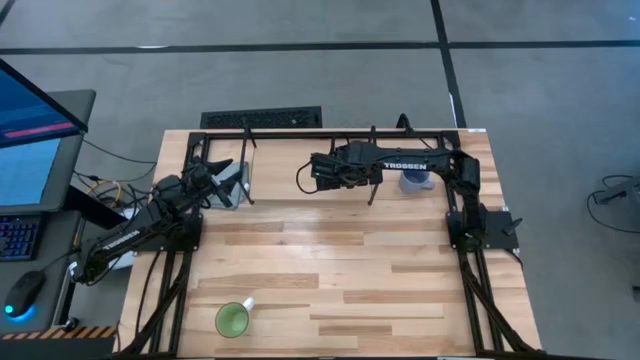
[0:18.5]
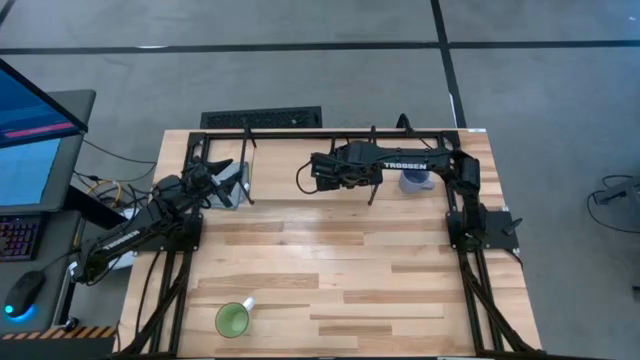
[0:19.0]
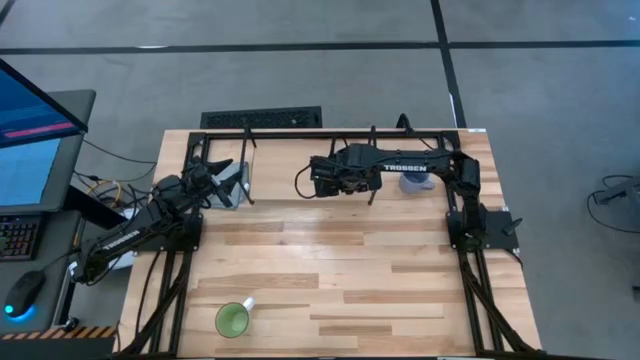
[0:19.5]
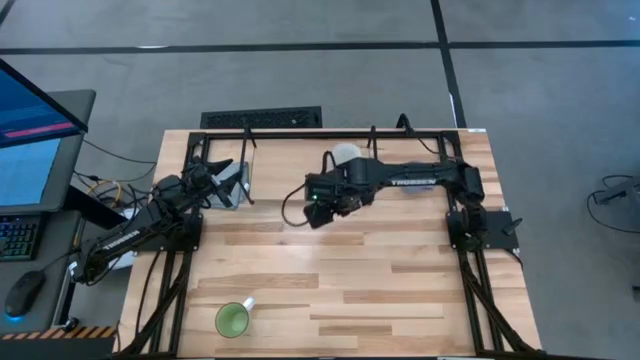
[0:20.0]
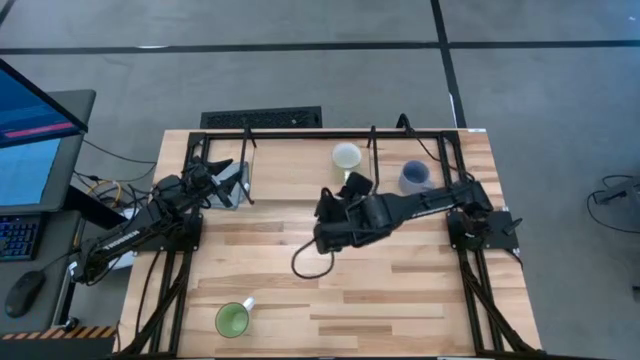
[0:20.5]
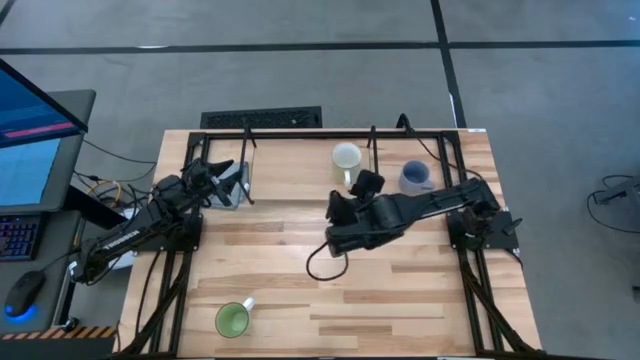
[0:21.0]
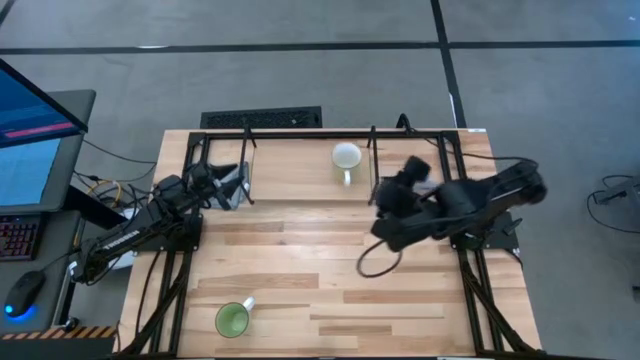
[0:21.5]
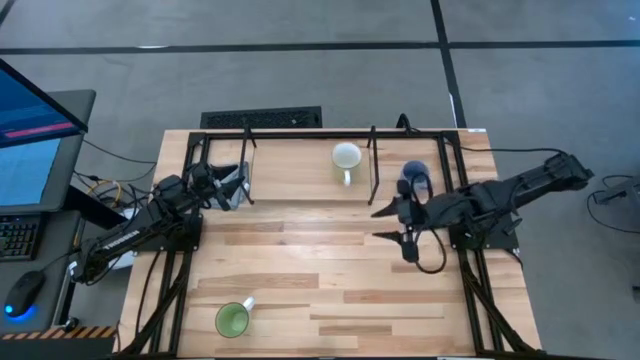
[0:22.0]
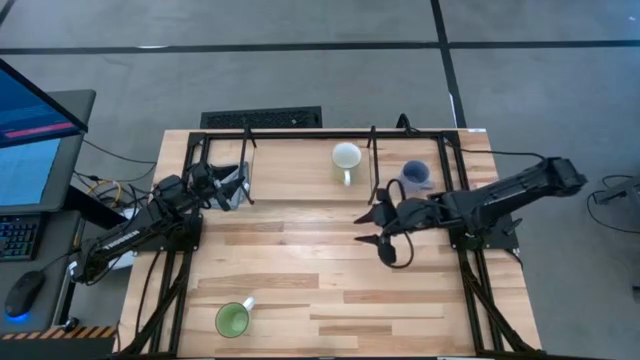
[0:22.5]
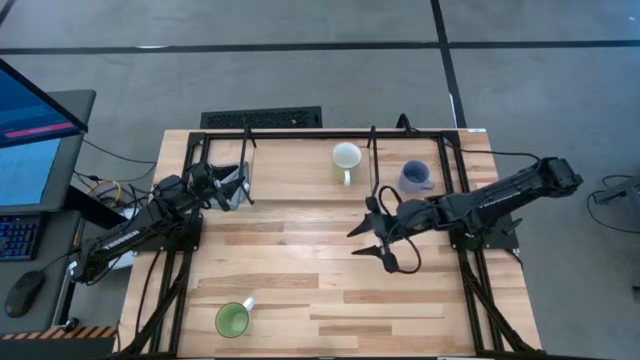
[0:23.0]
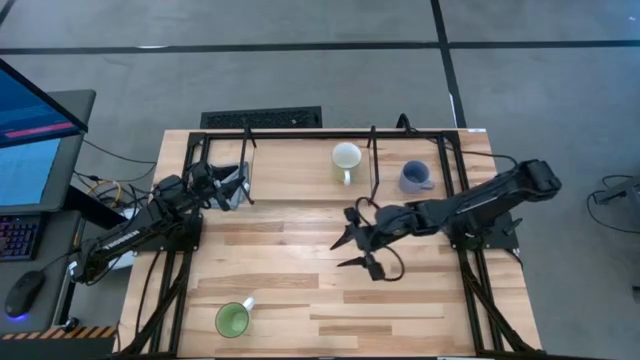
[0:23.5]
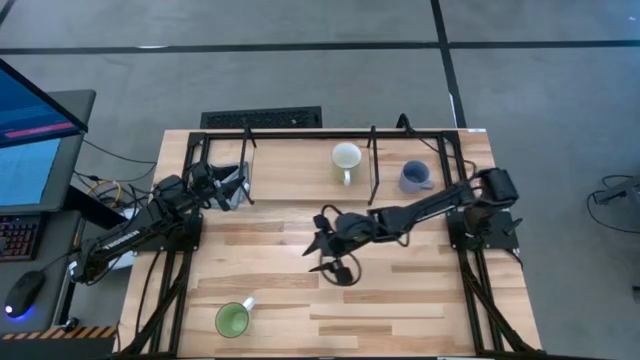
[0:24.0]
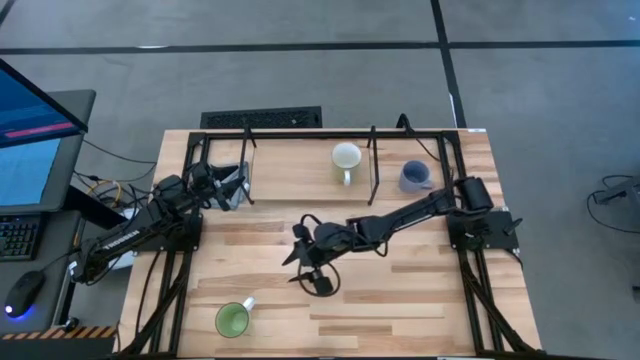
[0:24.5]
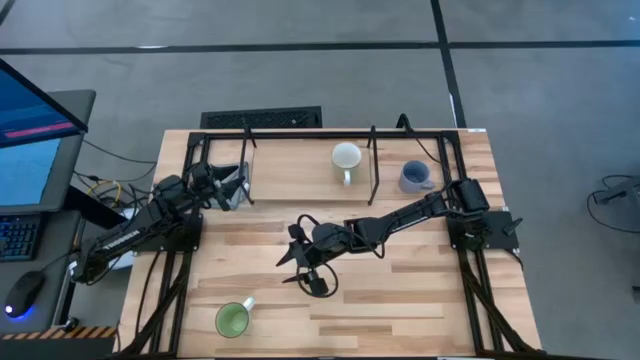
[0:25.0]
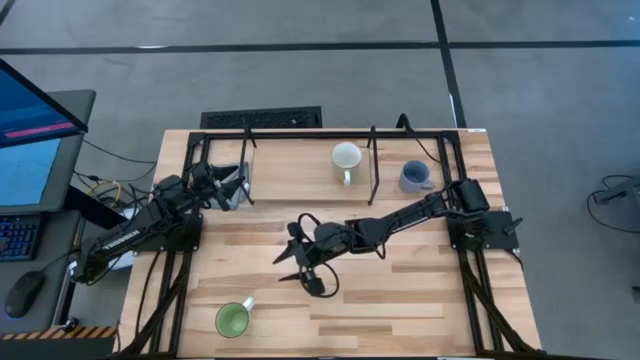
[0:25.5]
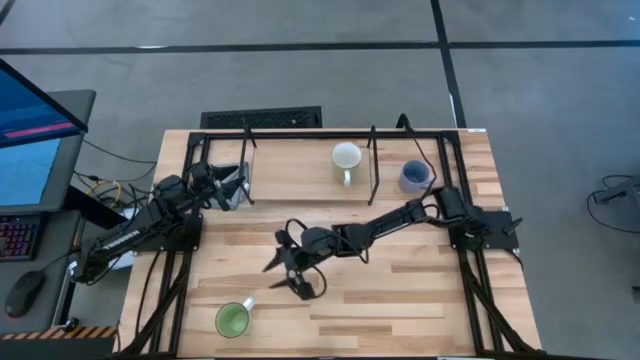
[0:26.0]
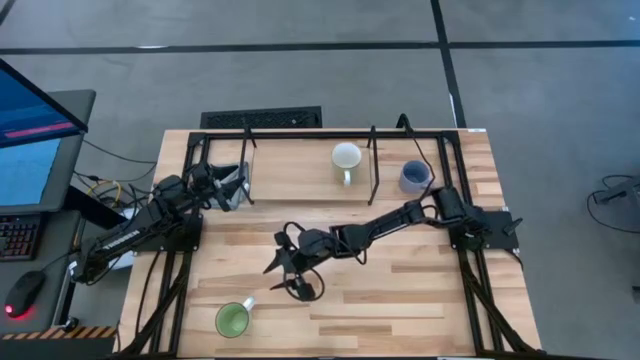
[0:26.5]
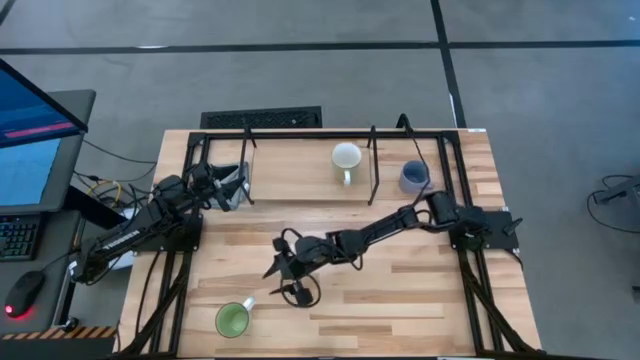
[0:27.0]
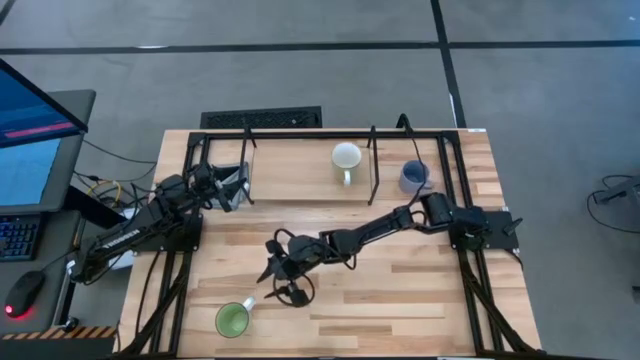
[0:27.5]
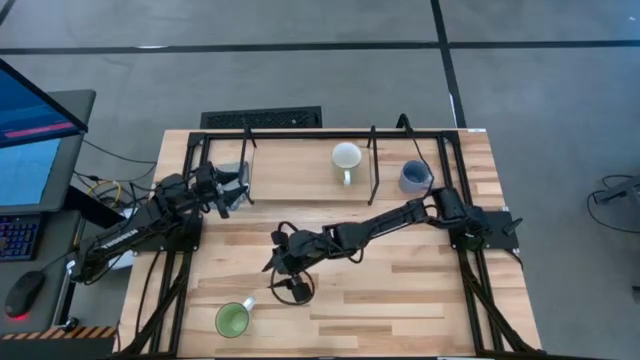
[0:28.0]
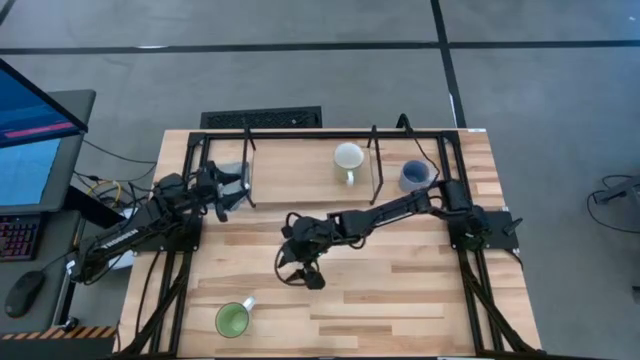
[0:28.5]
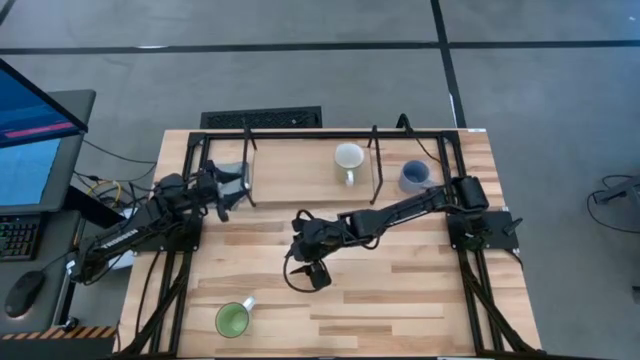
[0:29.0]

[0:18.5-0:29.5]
Task: Stack small to large cups/mugs on shelf
Adjust the shelf

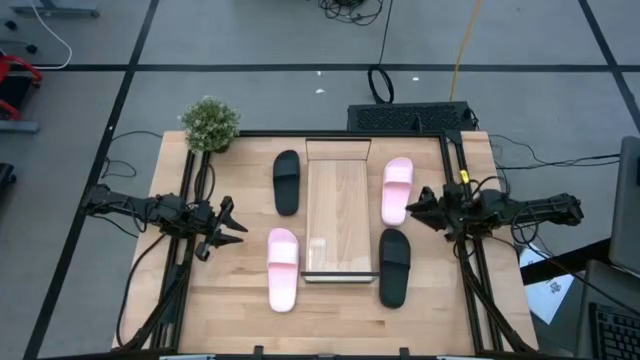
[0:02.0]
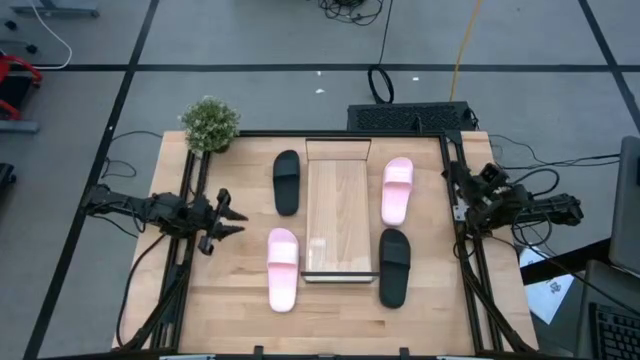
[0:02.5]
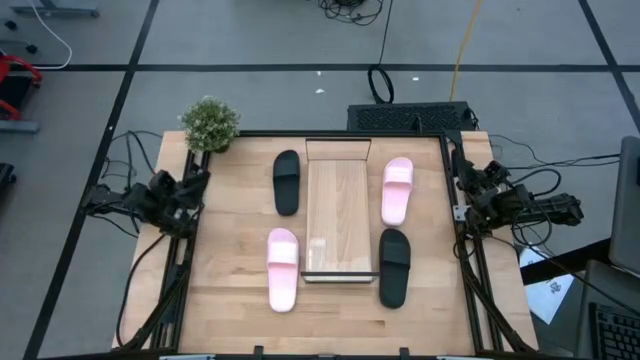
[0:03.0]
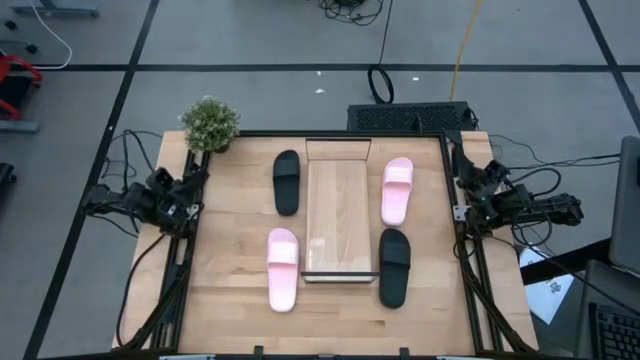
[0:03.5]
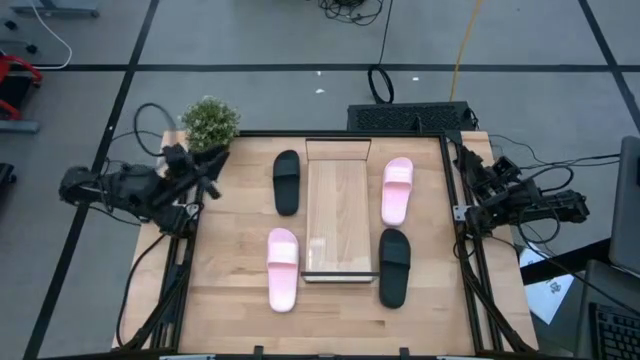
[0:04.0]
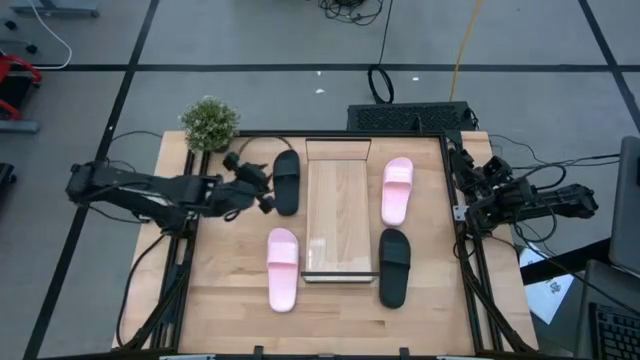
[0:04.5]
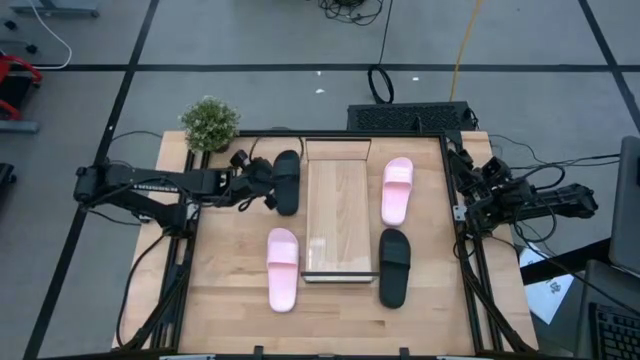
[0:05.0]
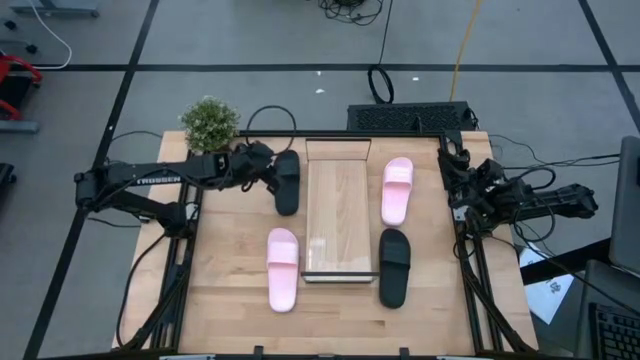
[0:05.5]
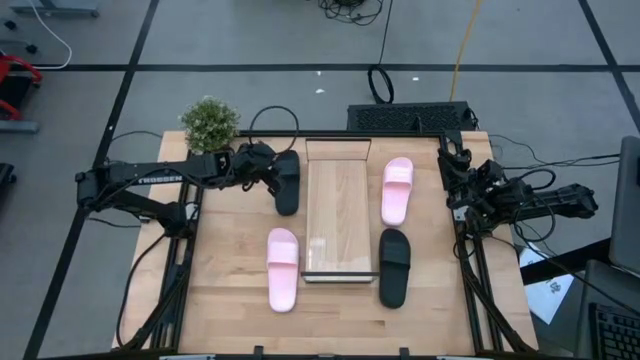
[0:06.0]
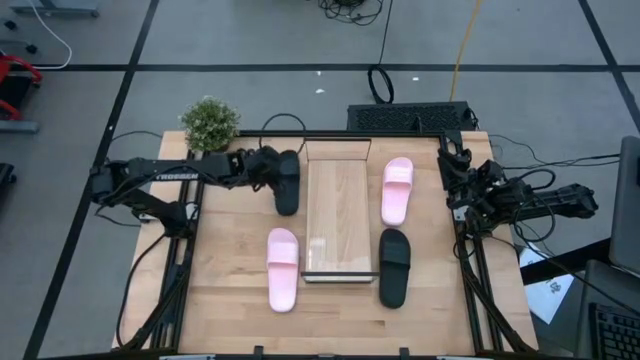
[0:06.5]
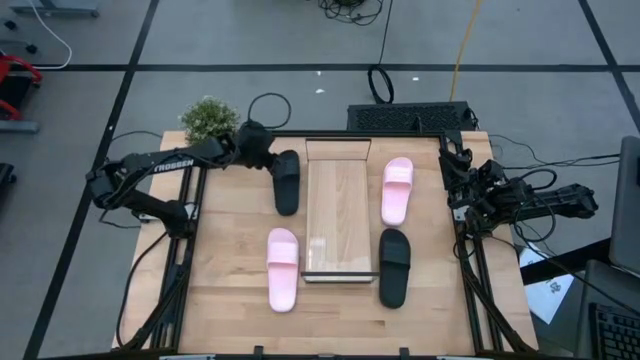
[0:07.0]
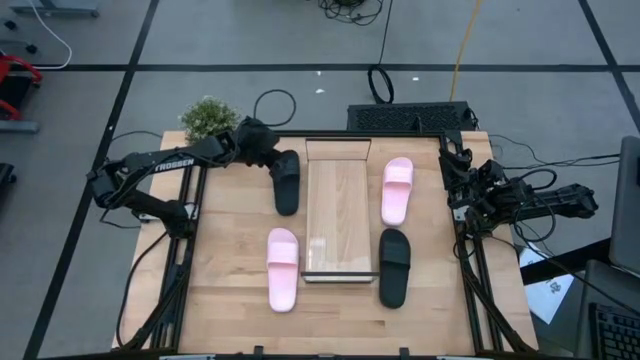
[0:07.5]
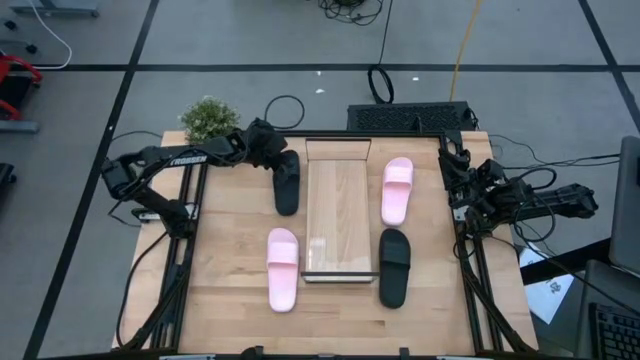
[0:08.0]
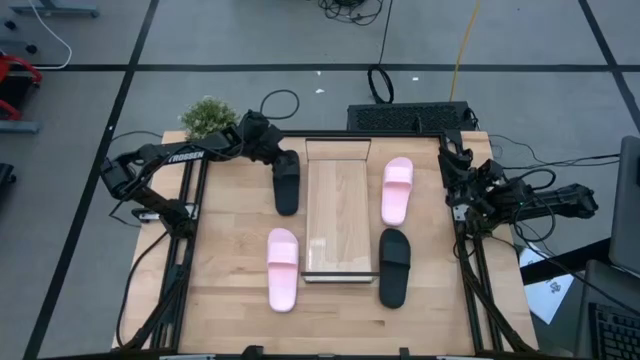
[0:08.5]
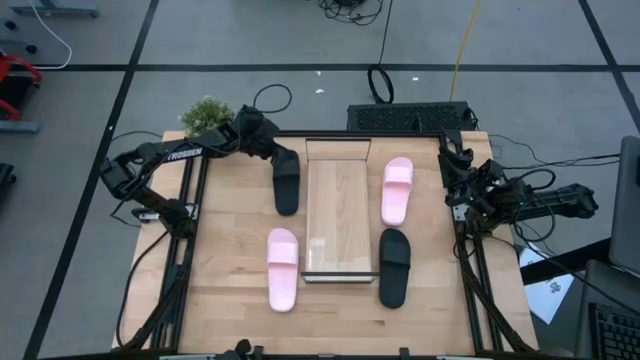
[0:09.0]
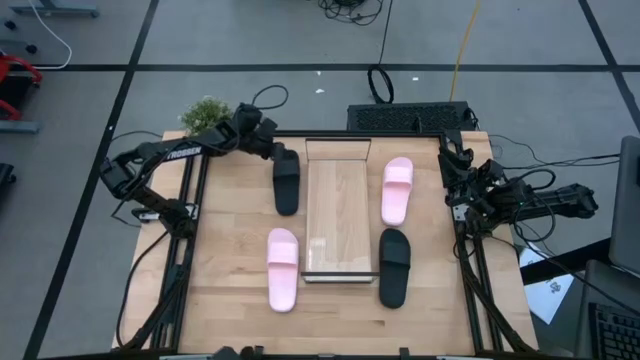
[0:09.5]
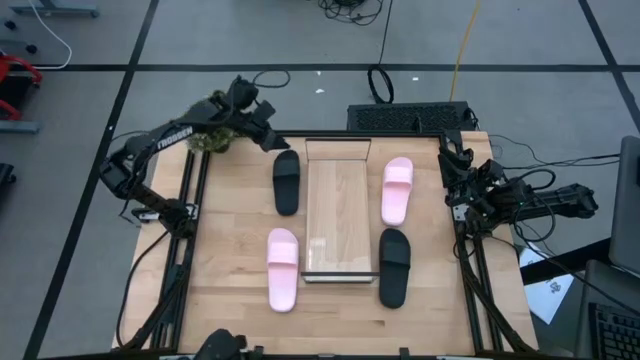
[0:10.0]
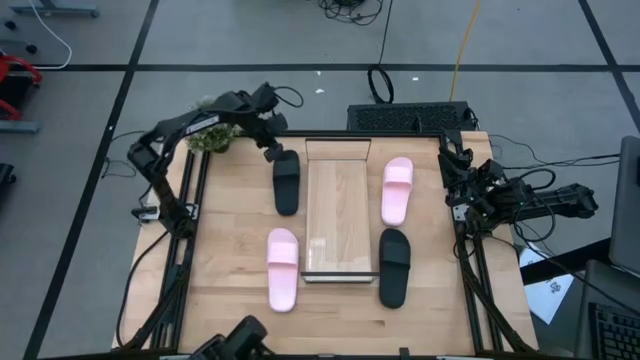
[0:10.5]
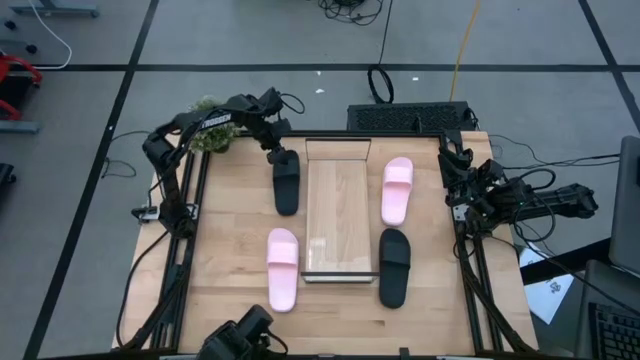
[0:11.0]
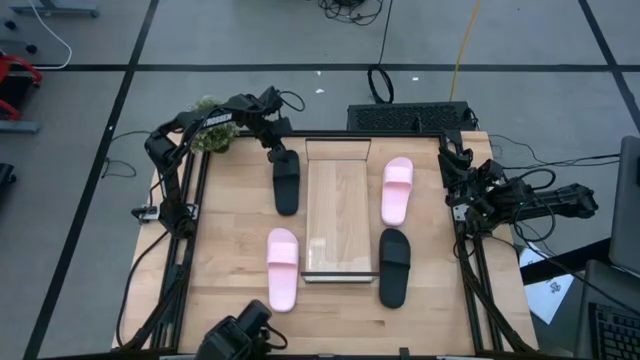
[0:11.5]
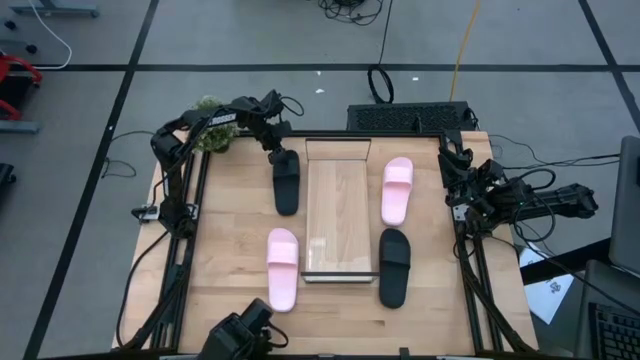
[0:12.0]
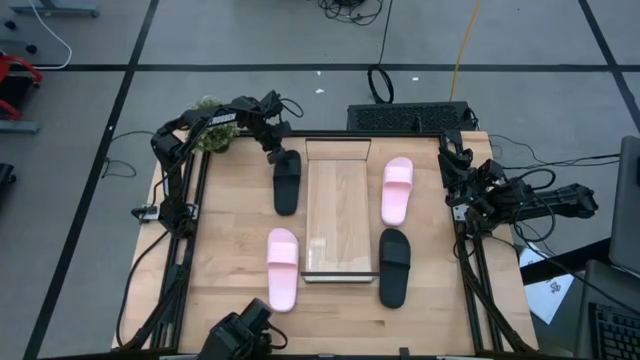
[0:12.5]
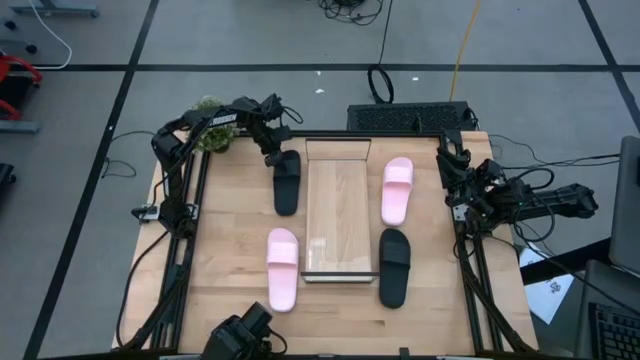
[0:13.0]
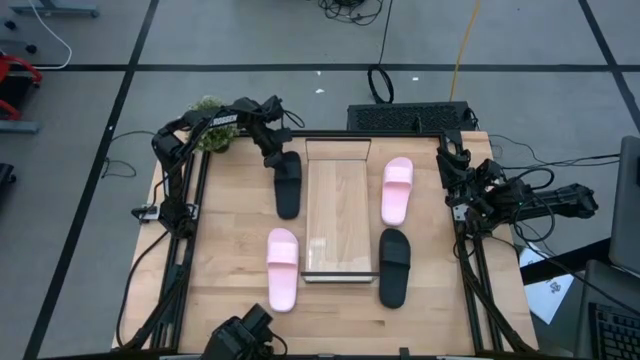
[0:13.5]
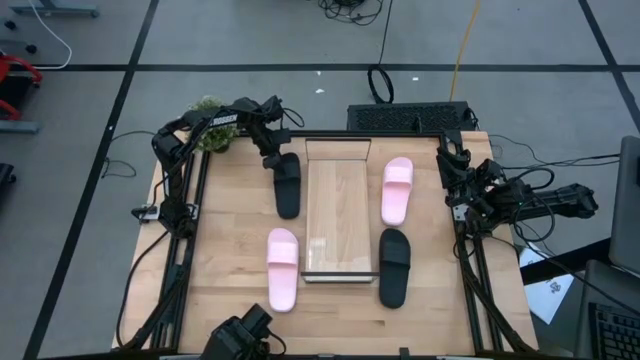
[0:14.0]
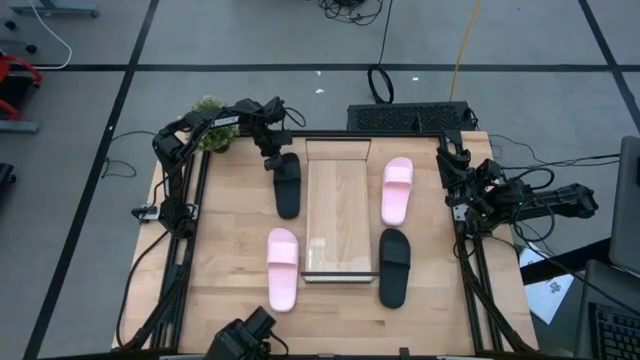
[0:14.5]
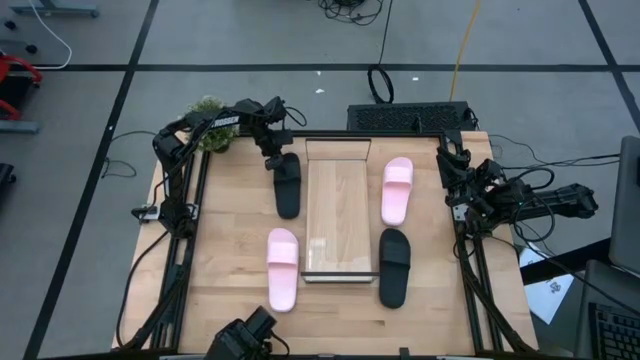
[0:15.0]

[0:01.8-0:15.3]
Task: Pick and place slides into the shelf
Put the top black slipper on the shelf
